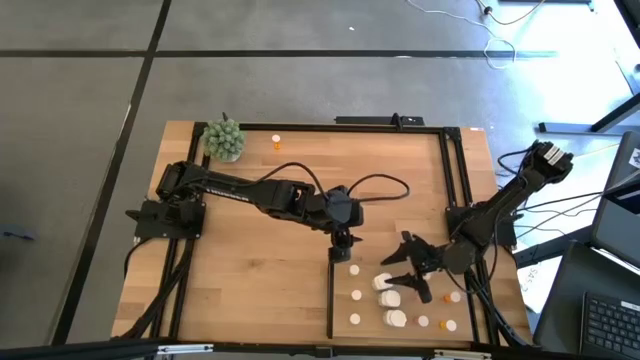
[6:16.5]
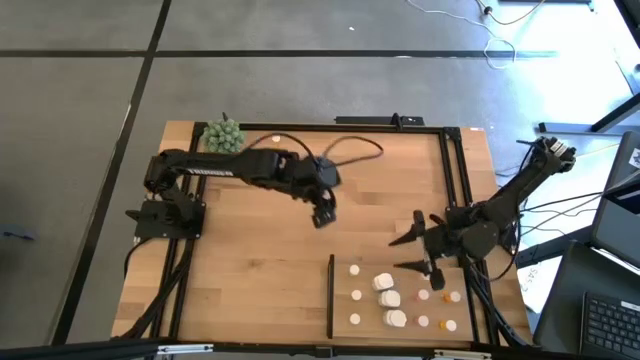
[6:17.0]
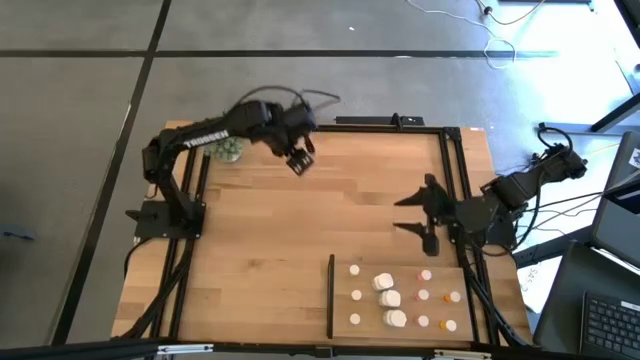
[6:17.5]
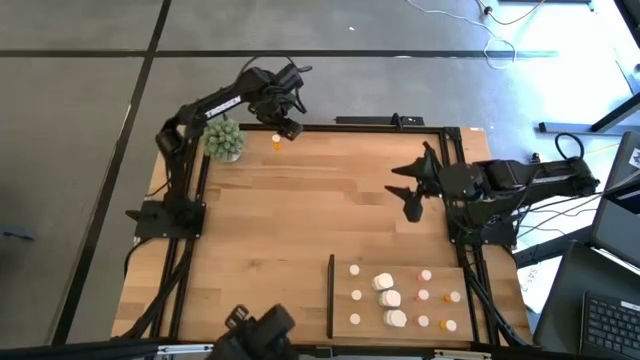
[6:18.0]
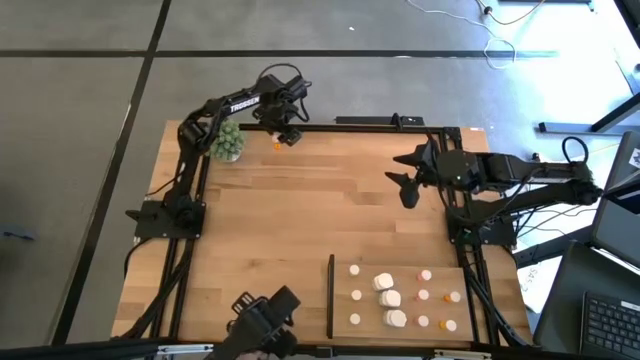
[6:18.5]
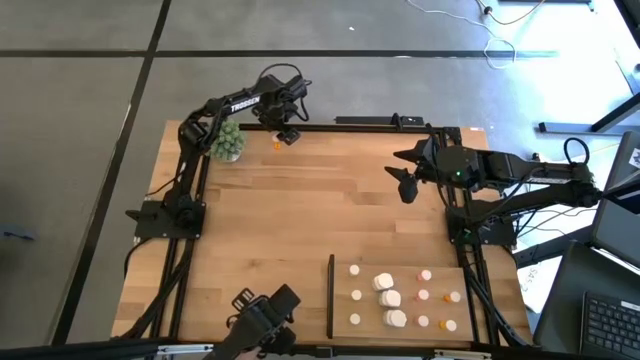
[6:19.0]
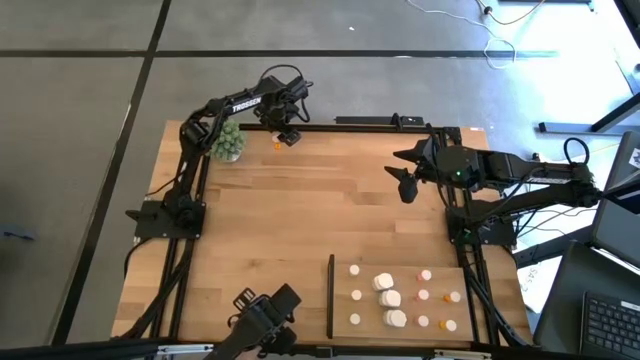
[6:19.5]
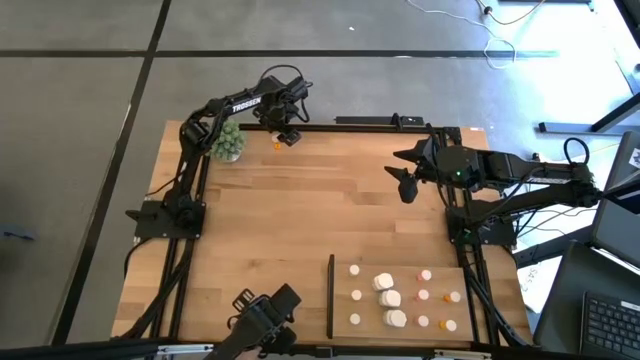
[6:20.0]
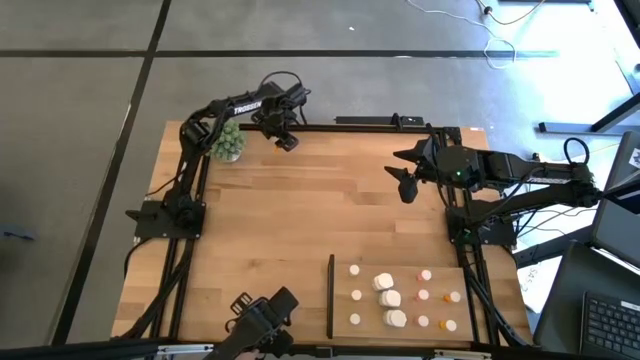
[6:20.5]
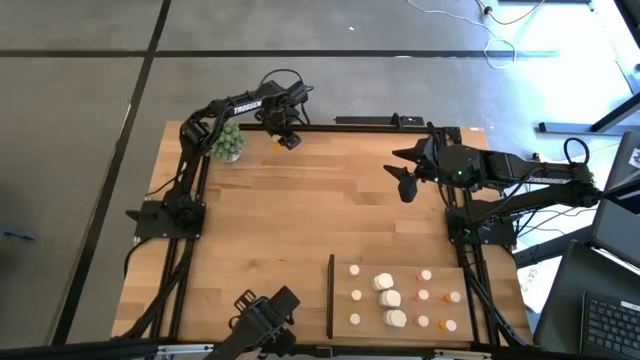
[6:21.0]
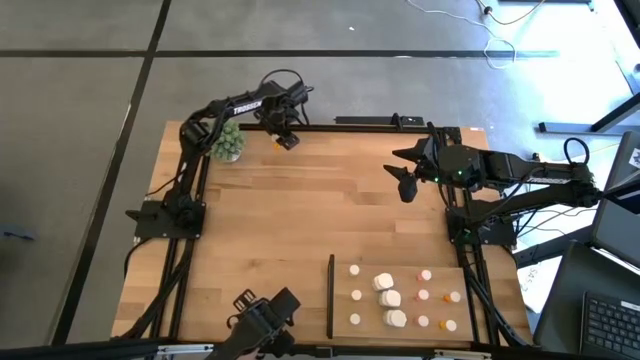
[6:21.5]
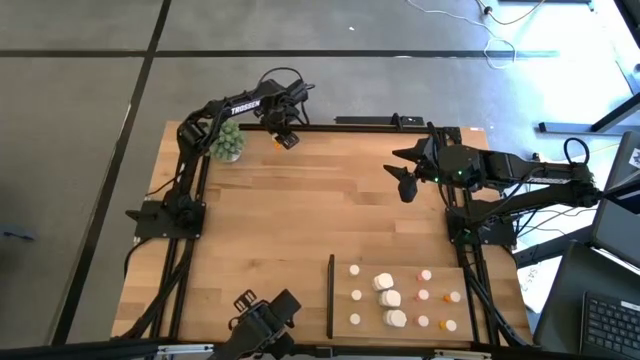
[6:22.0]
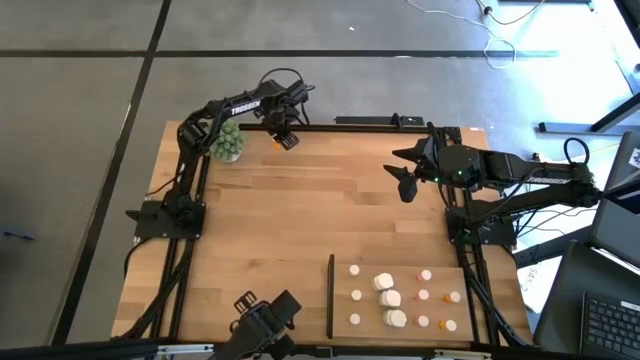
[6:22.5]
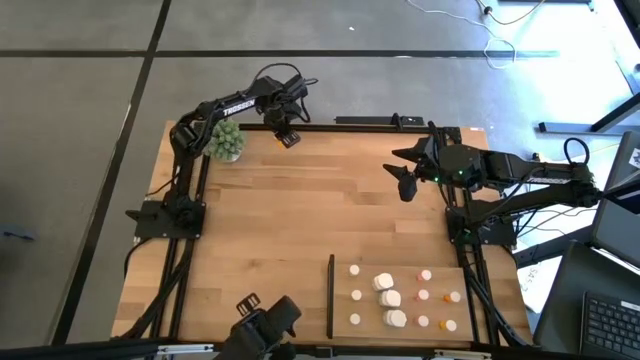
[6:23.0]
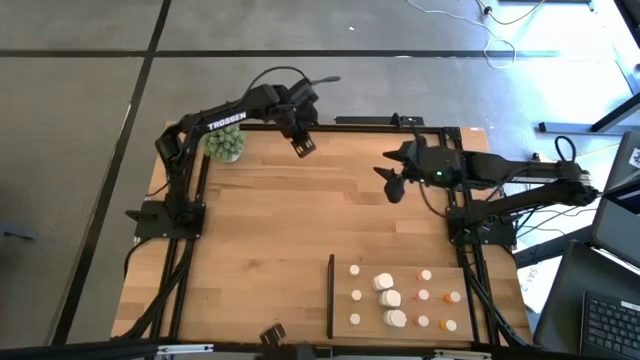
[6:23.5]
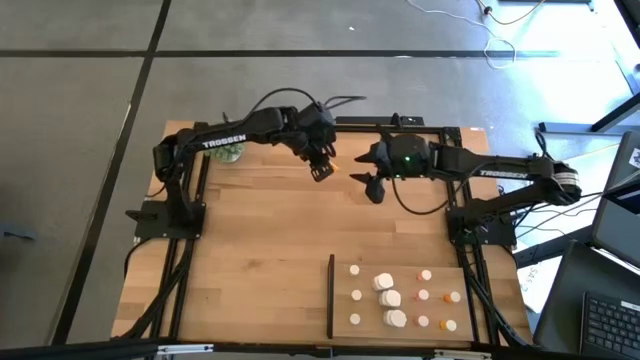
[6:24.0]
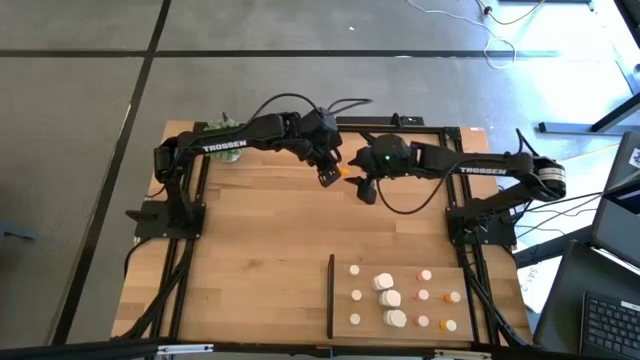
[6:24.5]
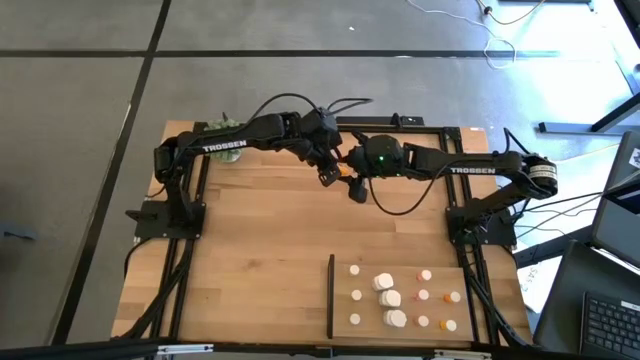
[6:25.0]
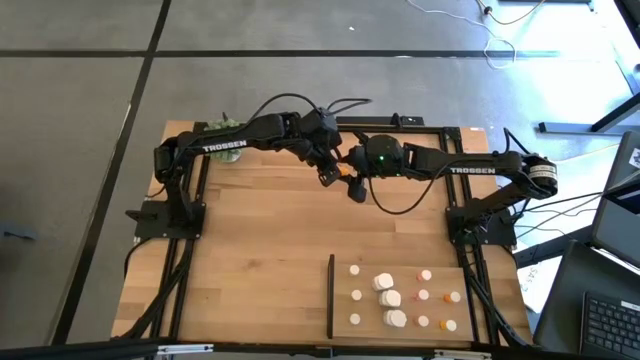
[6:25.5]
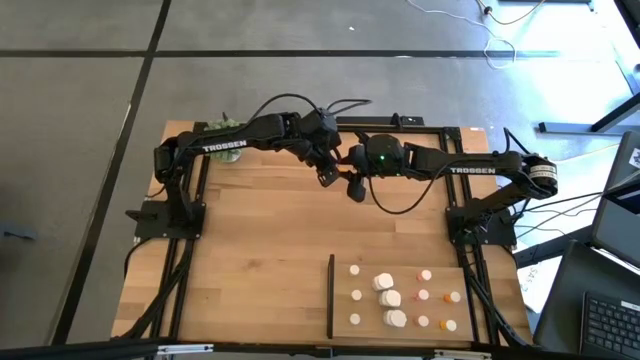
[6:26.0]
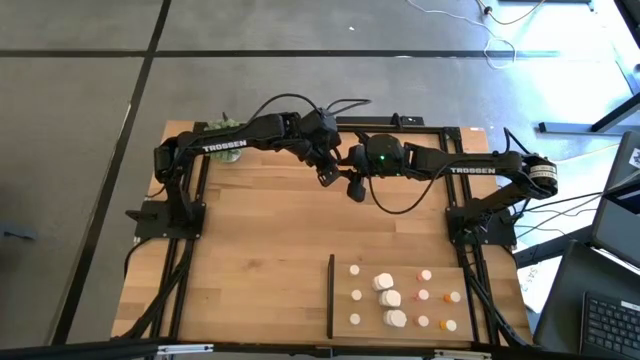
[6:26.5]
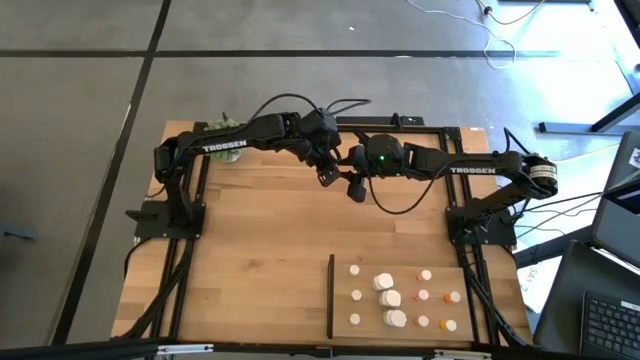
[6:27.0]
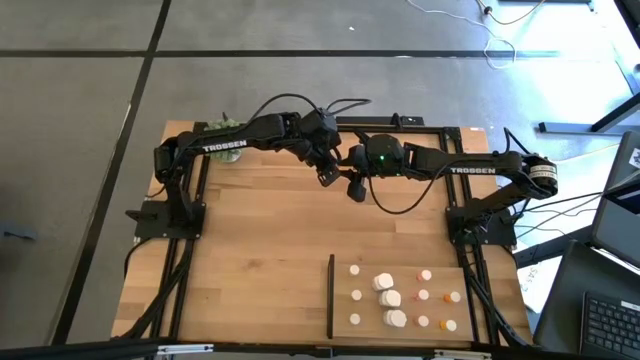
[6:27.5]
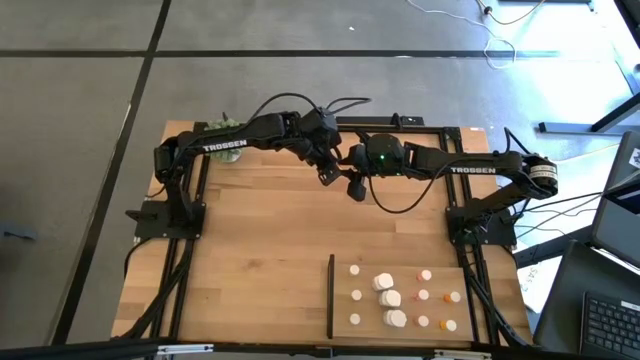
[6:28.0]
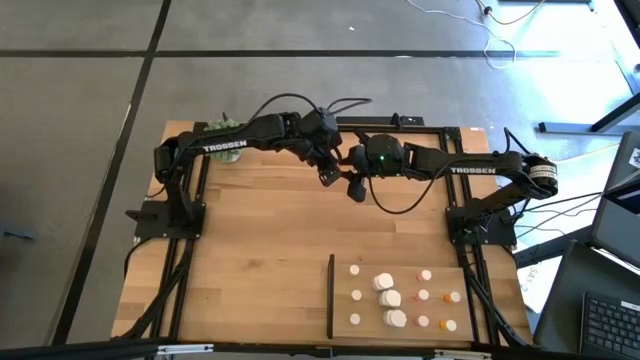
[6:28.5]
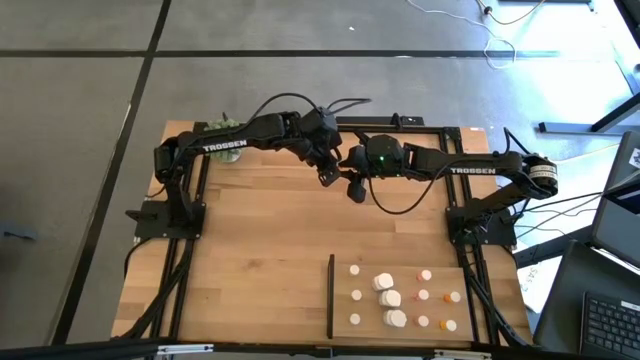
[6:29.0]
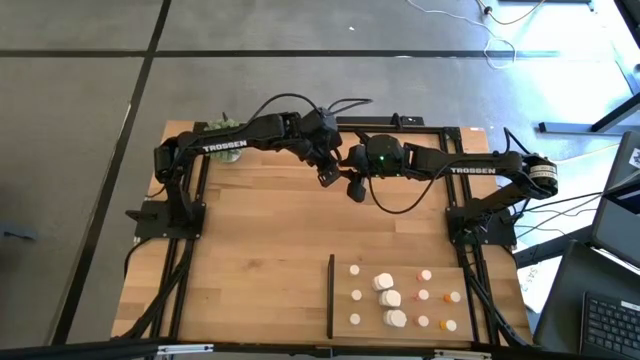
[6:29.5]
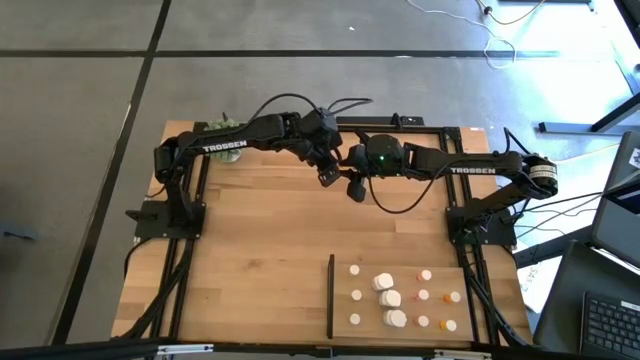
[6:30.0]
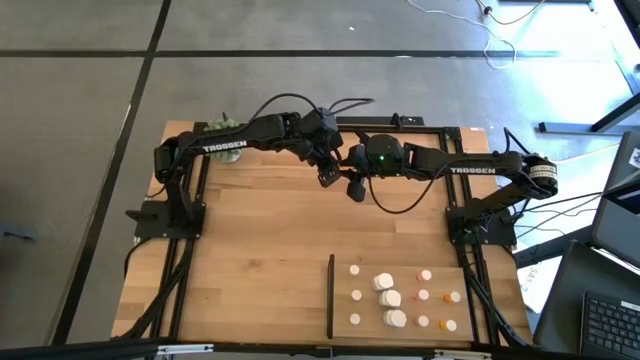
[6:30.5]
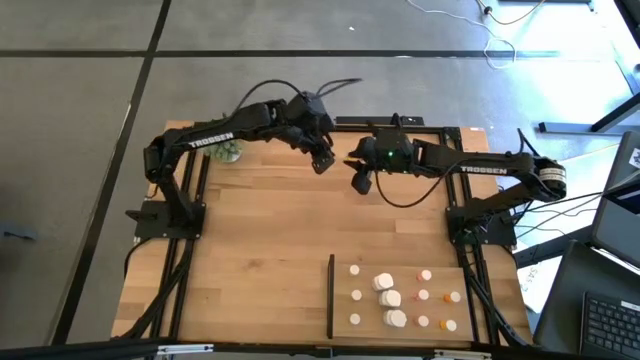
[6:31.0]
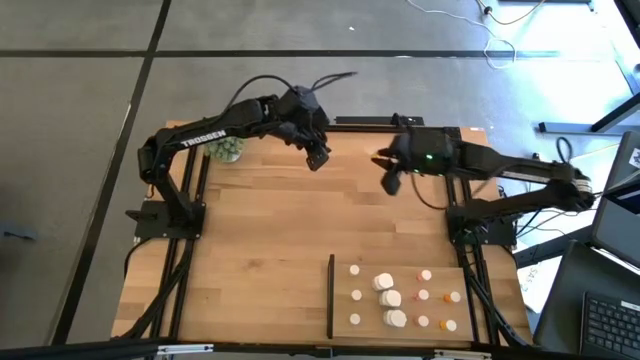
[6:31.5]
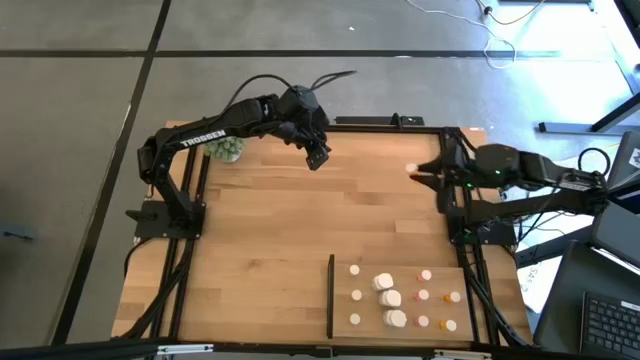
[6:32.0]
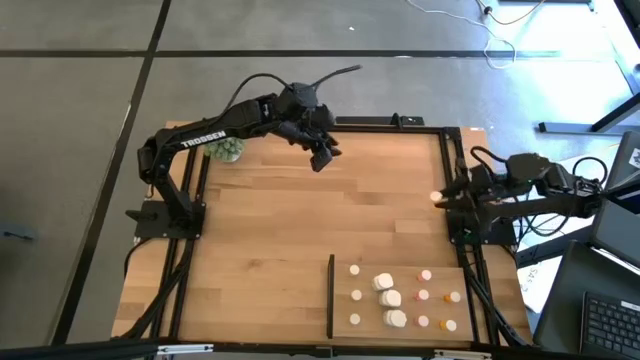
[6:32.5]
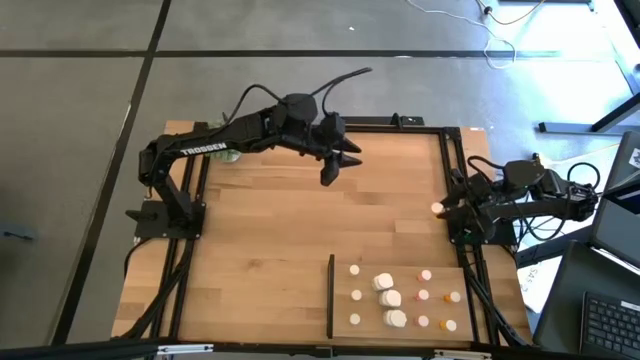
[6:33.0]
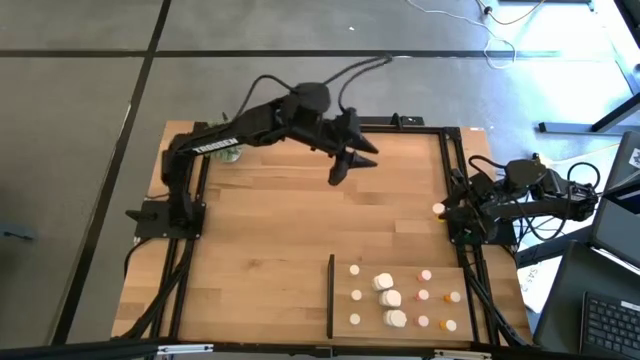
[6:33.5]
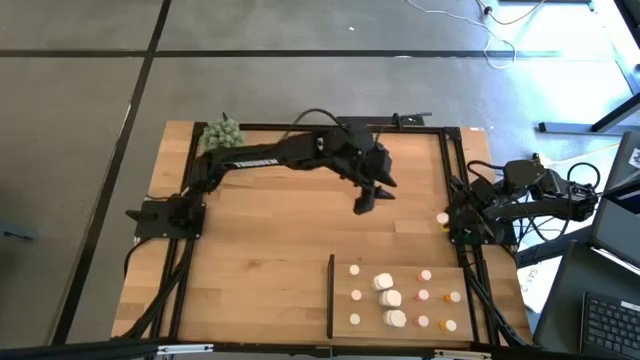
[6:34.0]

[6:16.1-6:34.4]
Task: Pick and place medicine bottles onto shelf by color
Put the orange pill bottle on the shelf aligned with the other orange pill bottles

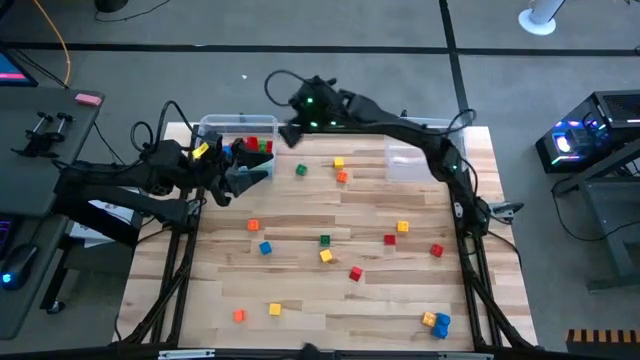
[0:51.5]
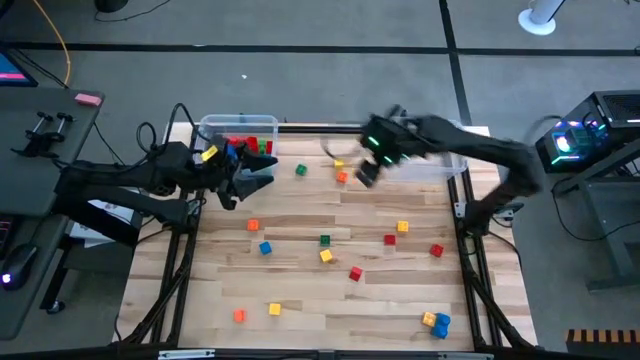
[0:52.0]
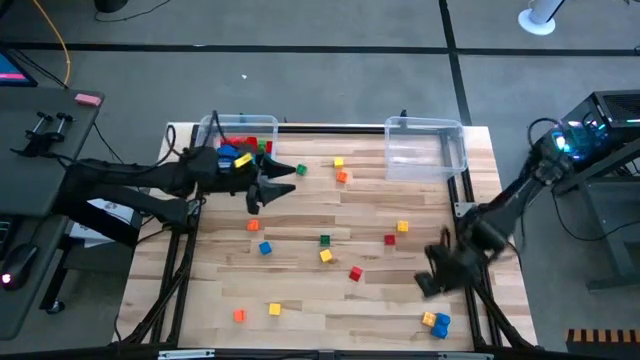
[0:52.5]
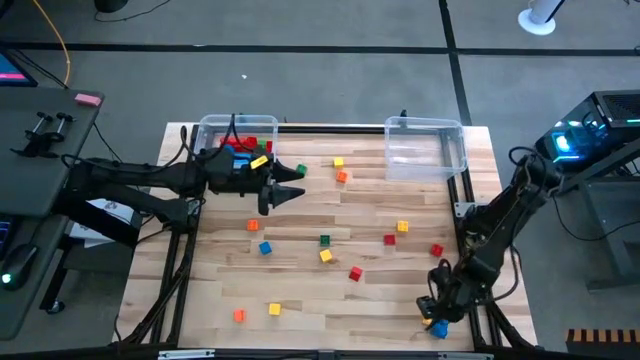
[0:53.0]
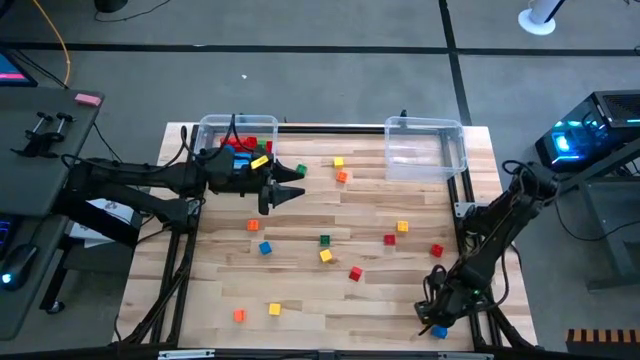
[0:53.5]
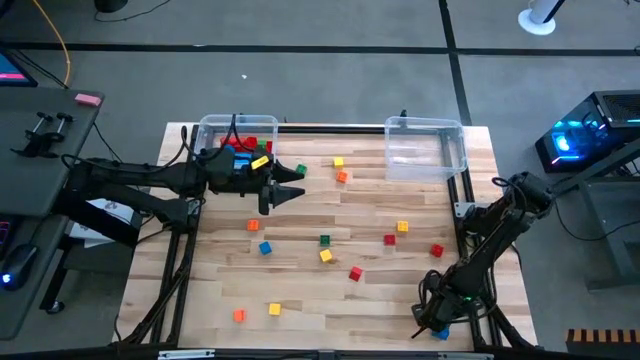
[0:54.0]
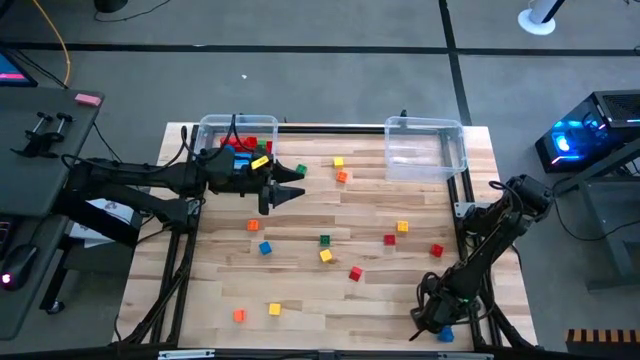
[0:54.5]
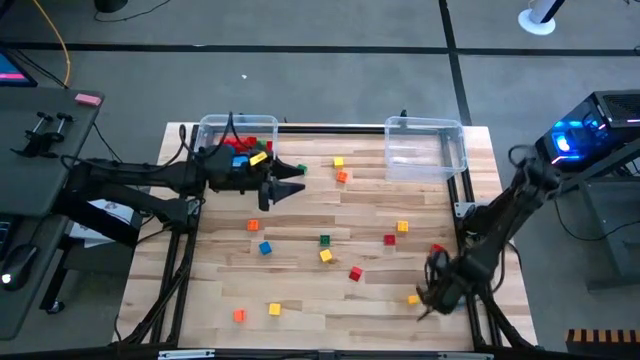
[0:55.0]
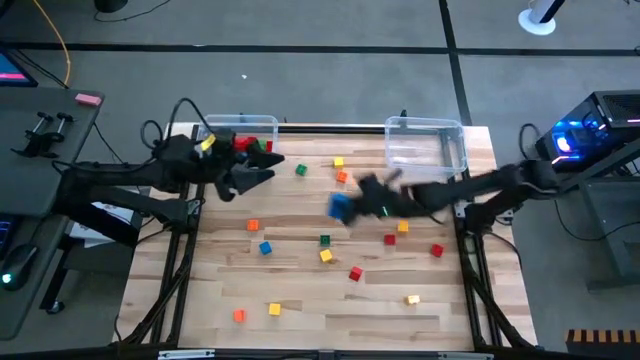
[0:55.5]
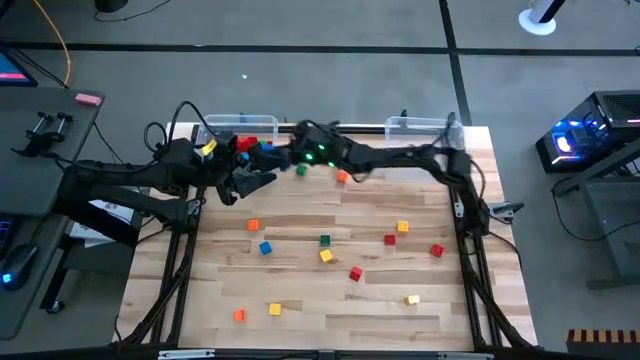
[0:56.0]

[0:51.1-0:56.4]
Task: Sort blocks by size
Put the large game piece into the left transparent bin
